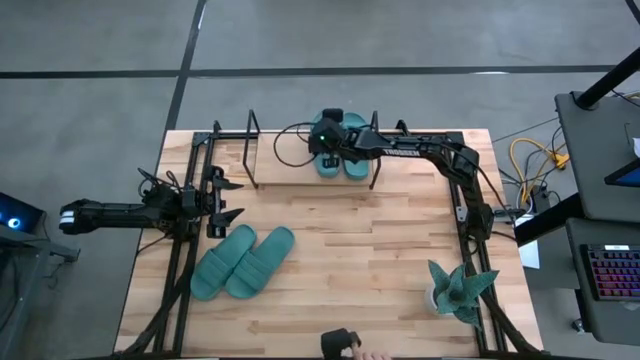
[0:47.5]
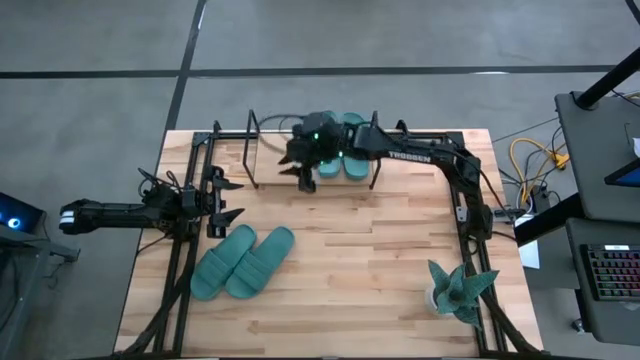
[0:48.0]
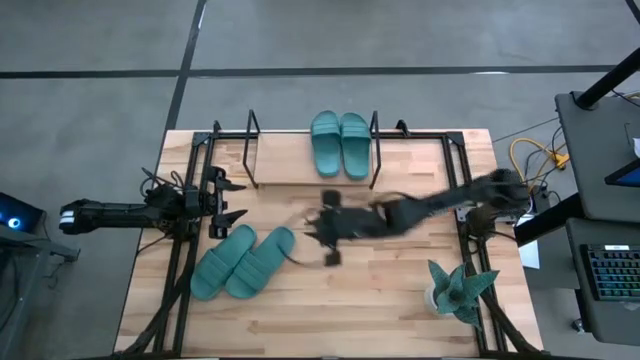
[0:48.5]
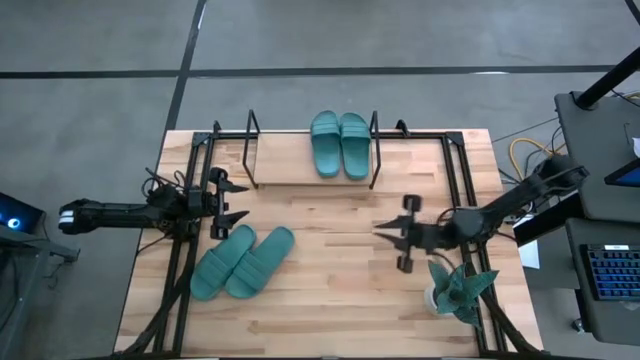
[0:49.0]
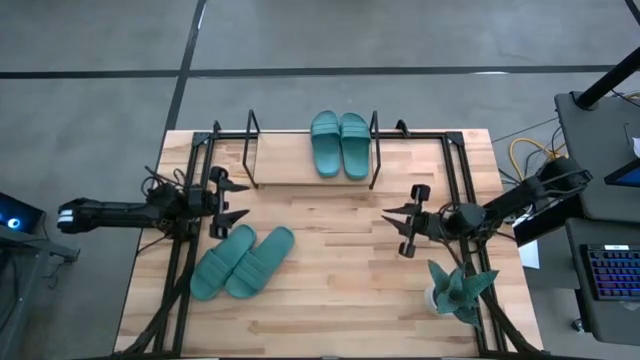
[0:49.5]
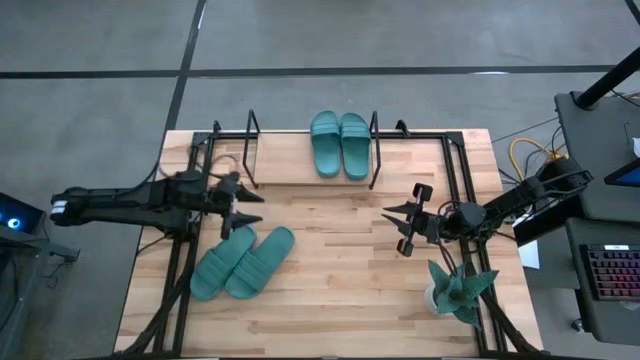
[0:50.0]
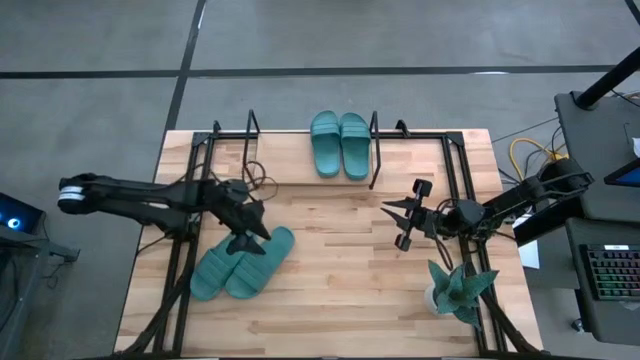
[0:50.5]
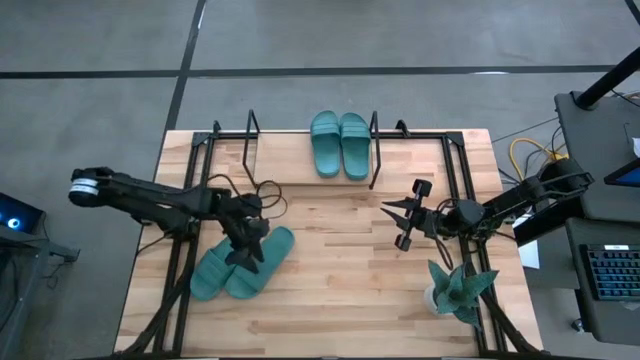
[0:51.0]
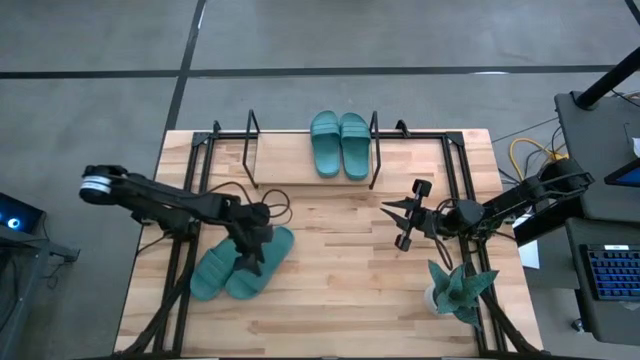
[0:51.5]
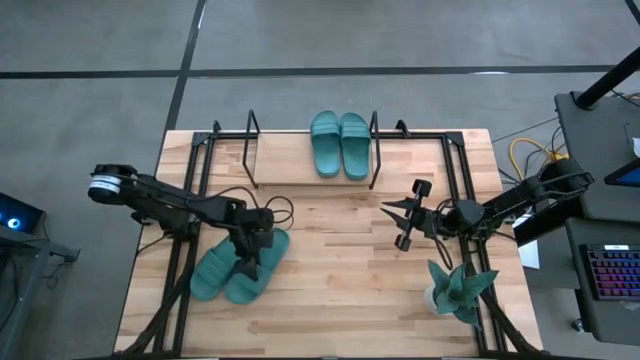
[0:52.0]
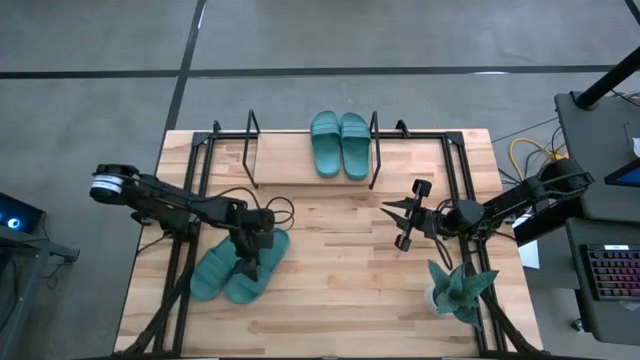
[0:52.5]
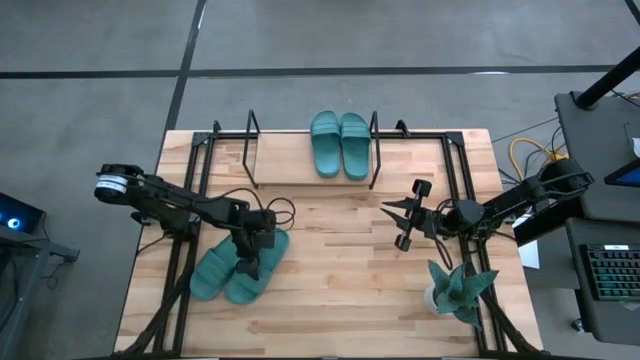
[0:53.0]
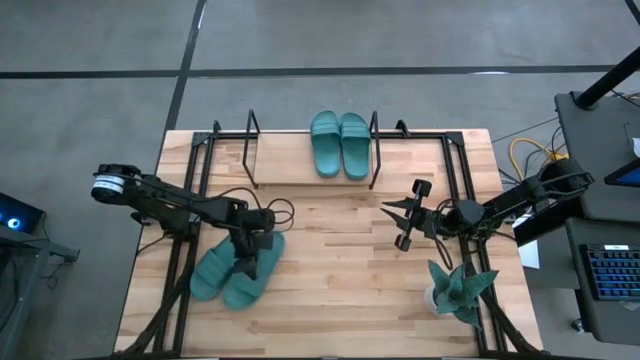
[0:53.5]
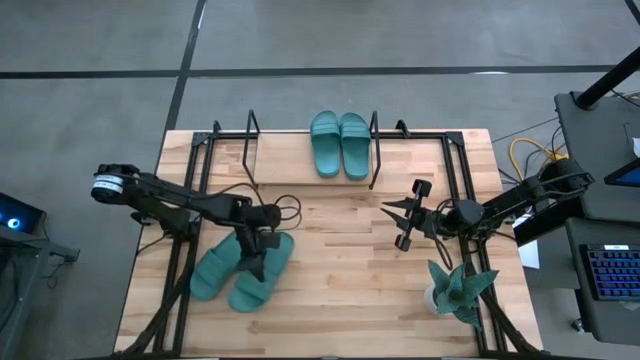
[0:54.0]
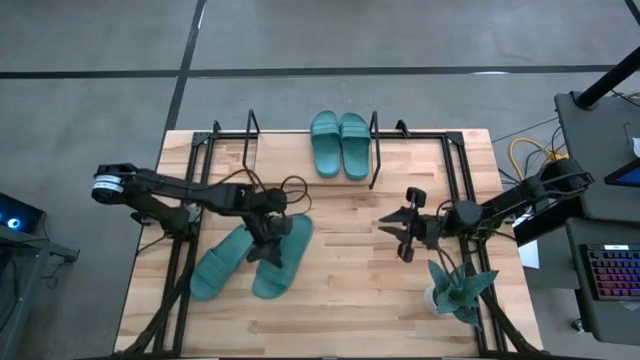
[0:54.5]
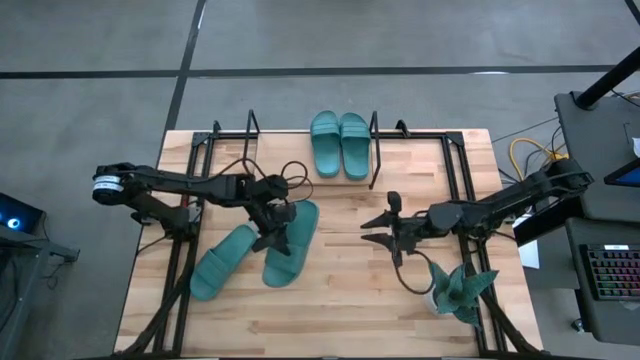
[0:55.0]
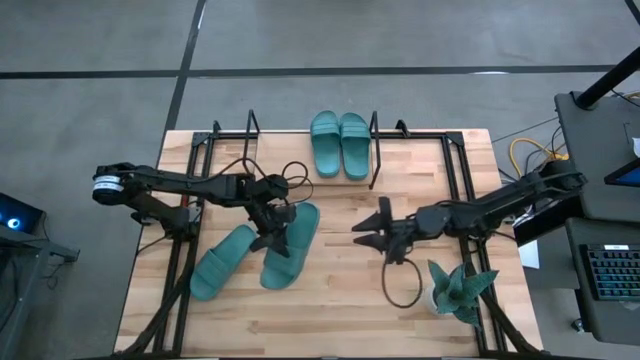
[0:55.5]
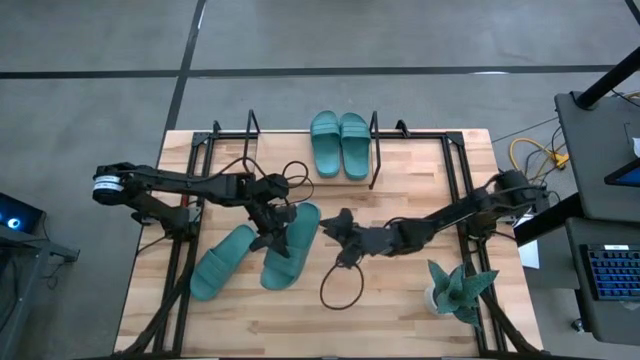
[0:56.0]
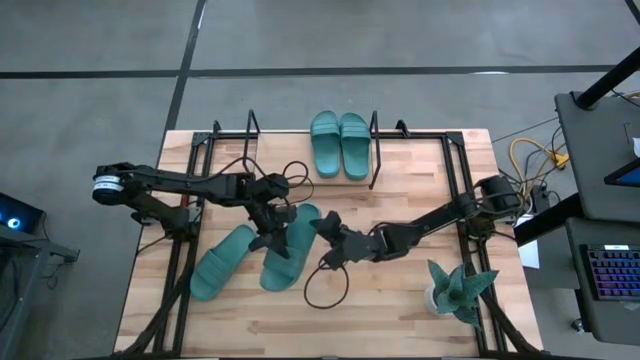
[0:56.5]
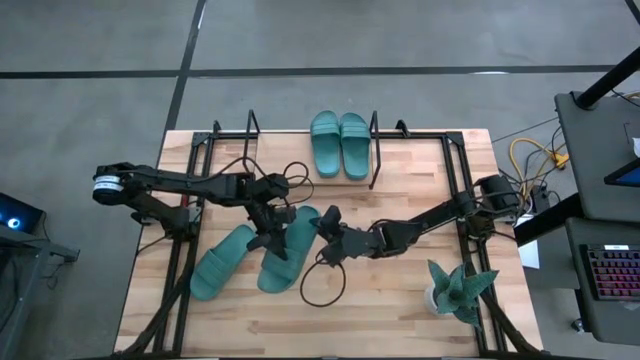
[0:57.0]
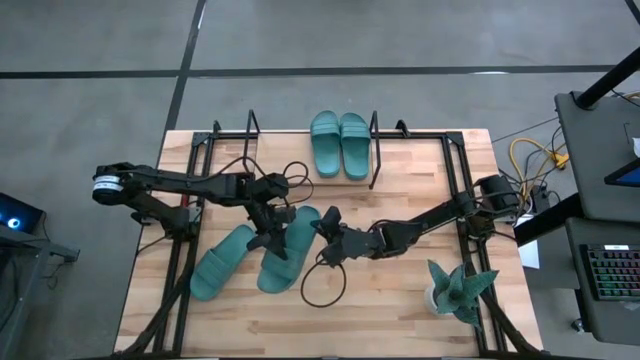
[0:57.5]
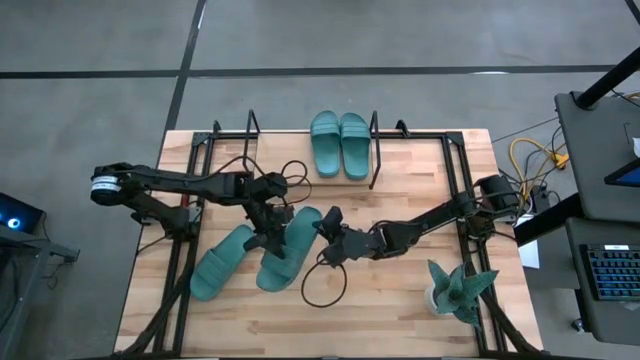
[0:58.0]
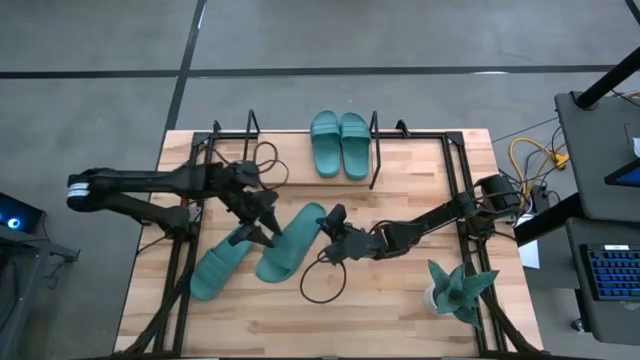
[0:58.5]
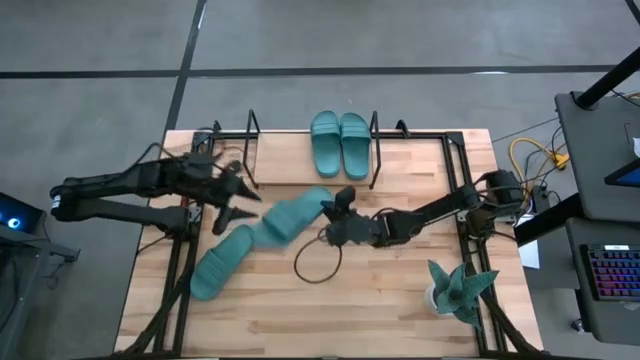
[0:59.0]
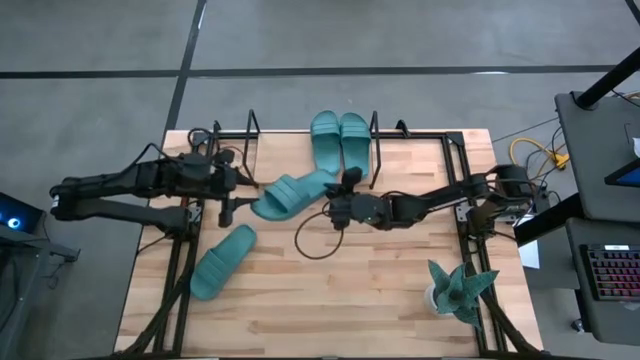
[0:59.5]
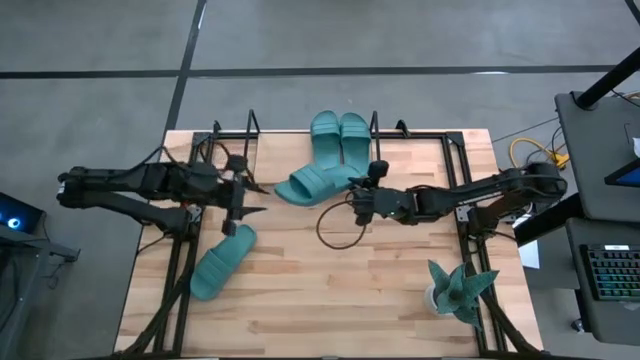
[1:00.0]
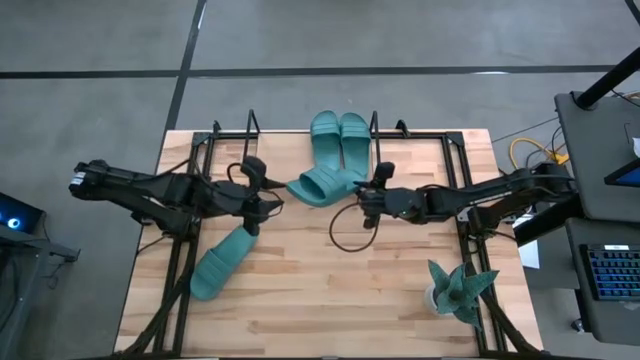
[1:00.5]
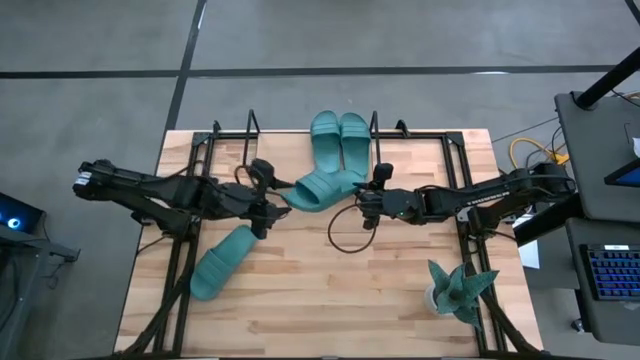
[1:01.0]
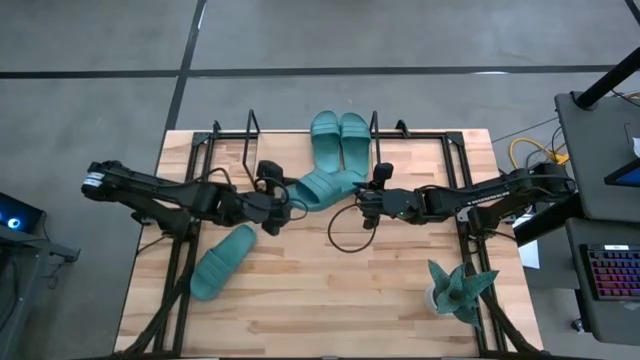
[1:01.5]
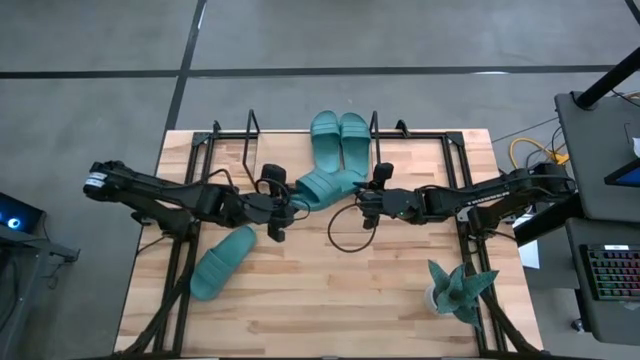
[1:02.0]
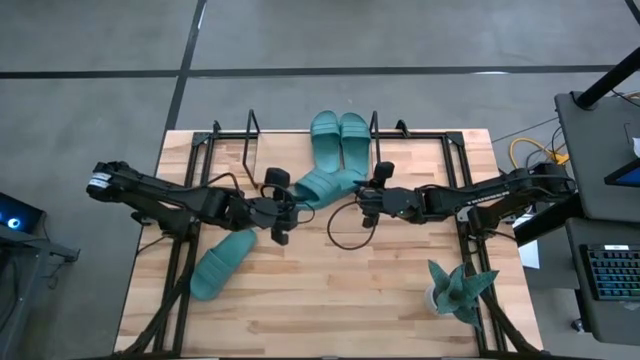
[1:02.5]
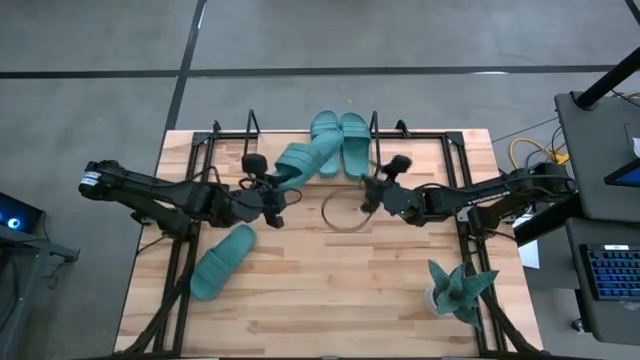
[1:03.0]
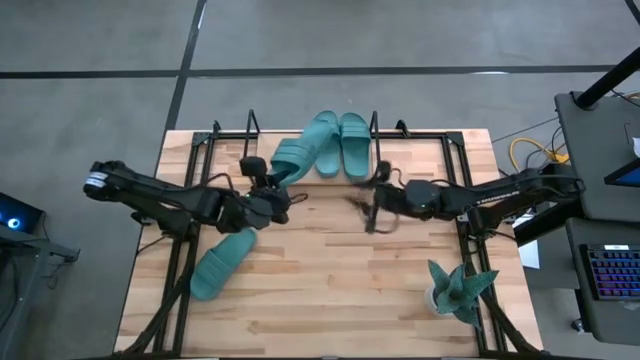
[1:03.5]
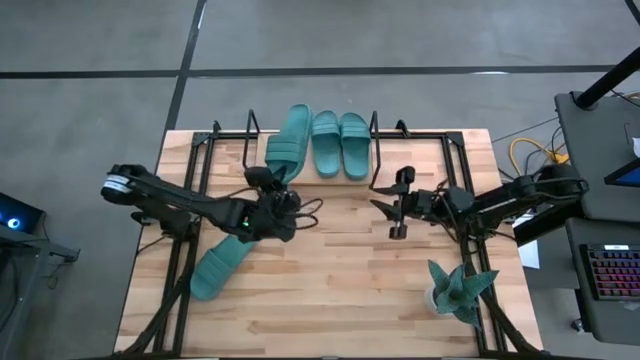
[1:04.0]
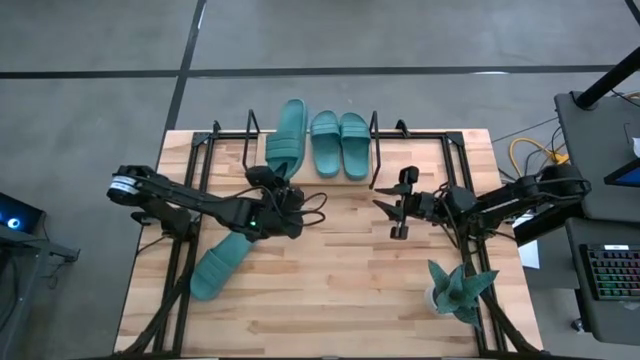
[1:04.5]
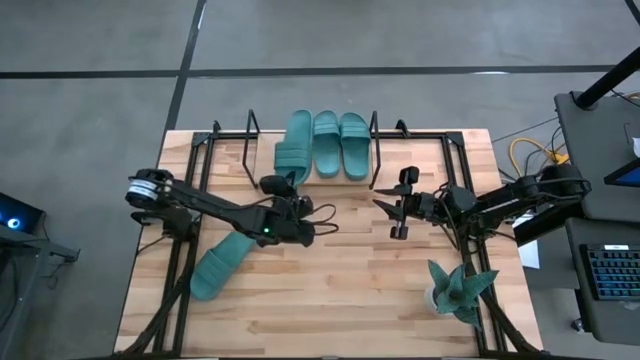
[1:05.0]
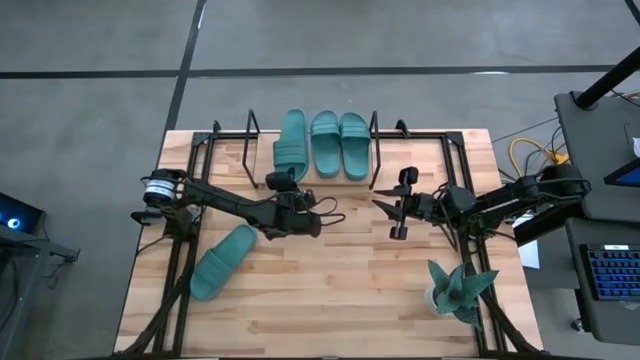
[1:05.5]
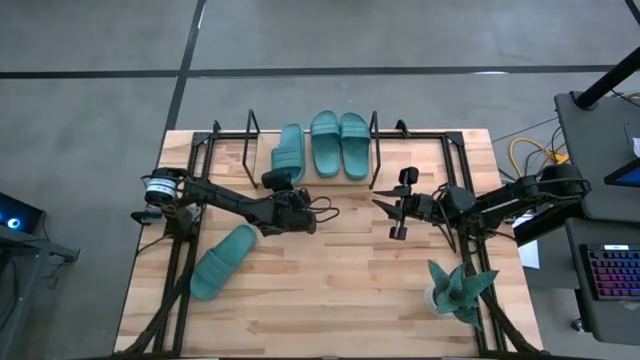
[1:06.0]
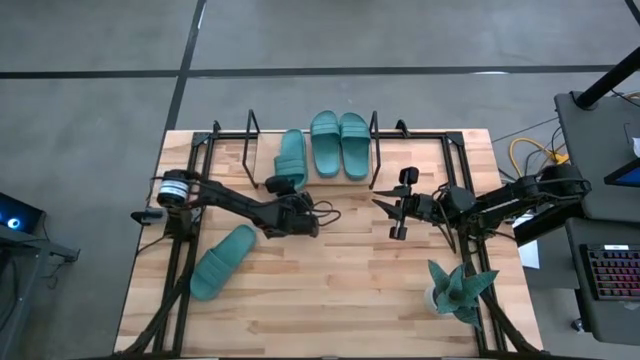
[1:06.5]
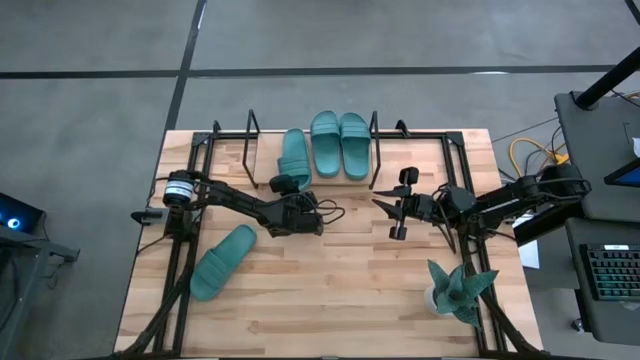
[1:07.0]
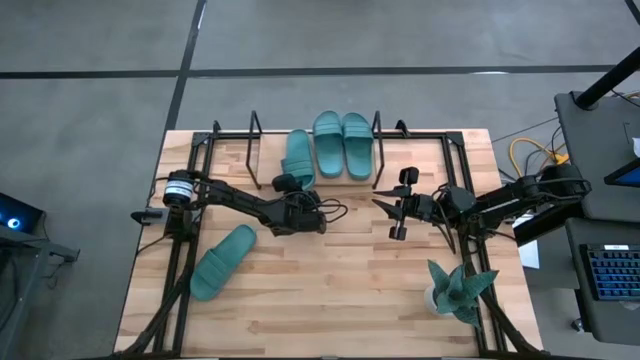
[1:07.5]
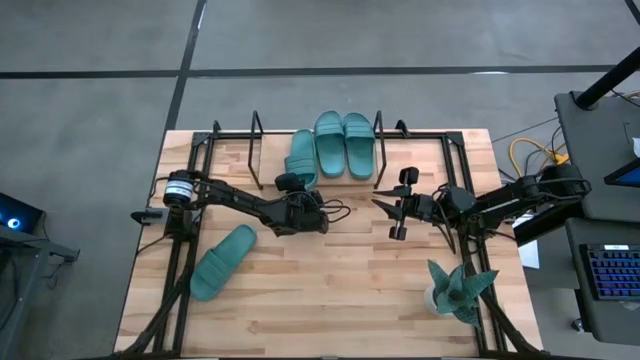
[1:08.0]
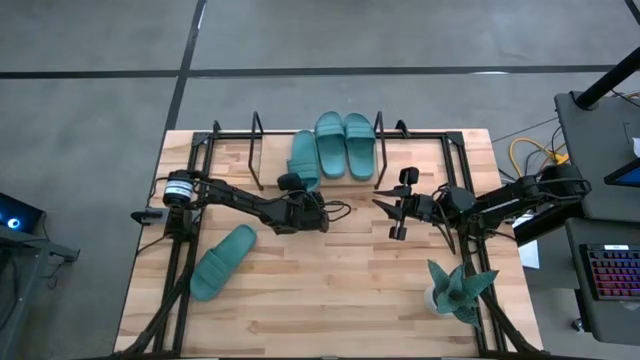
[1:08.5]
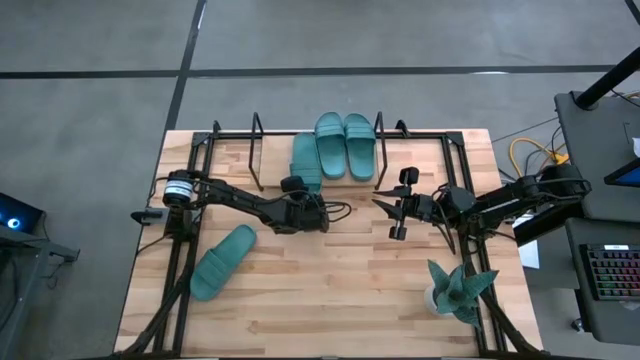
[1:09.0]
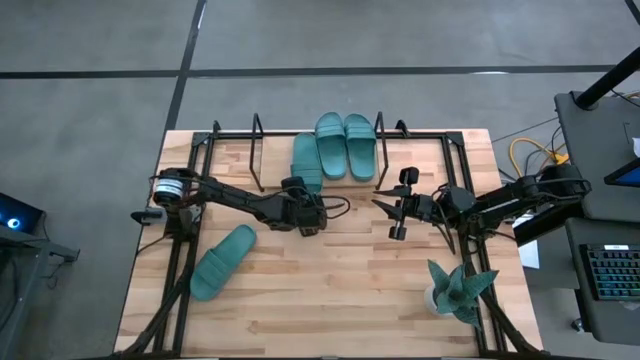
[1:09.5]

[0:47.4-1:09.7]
Task: Pick and place slides into the shelf
Put the blue slide on the shelf
